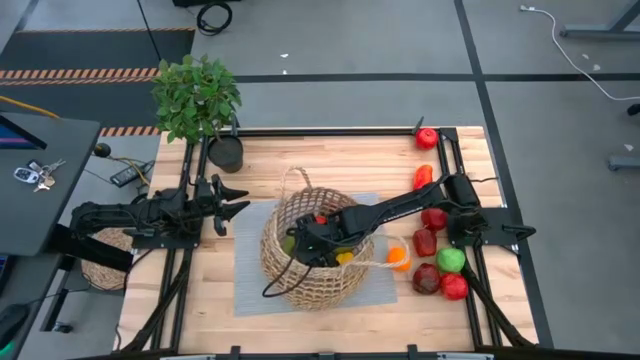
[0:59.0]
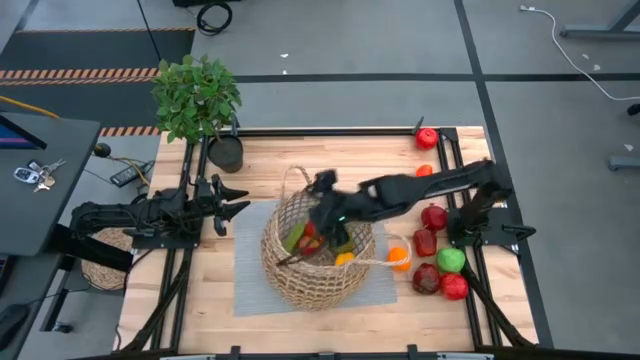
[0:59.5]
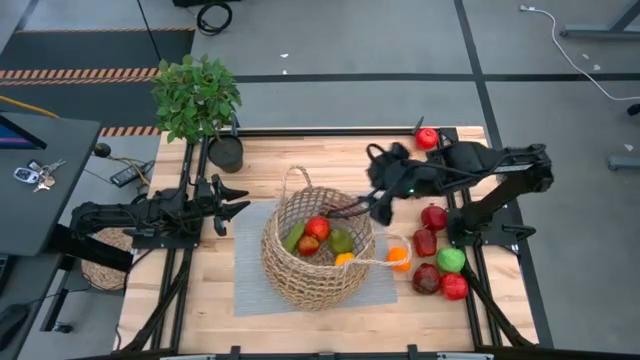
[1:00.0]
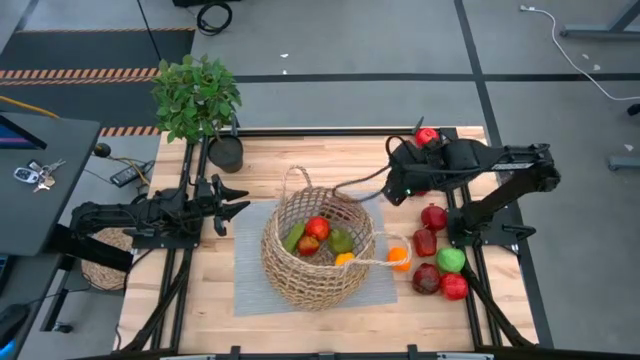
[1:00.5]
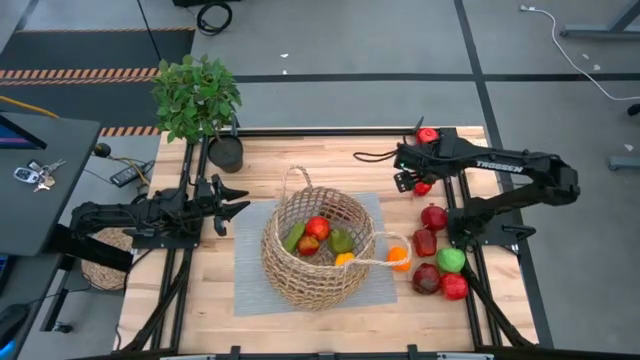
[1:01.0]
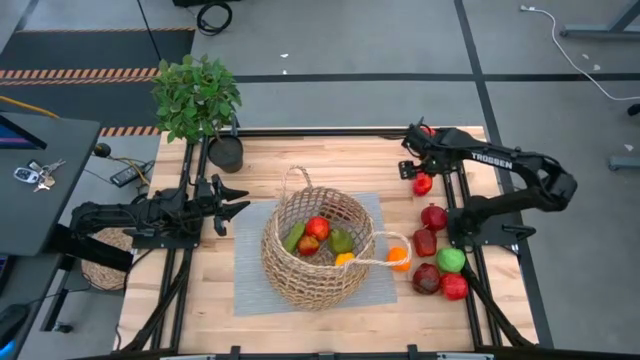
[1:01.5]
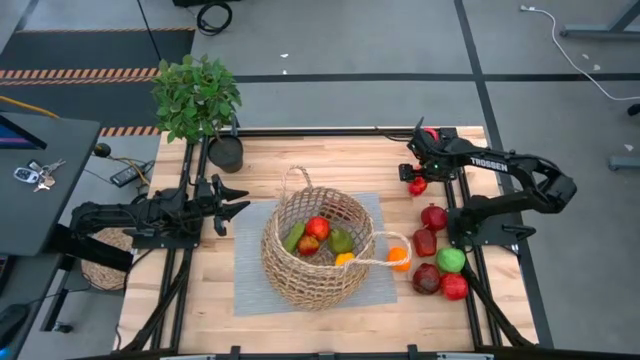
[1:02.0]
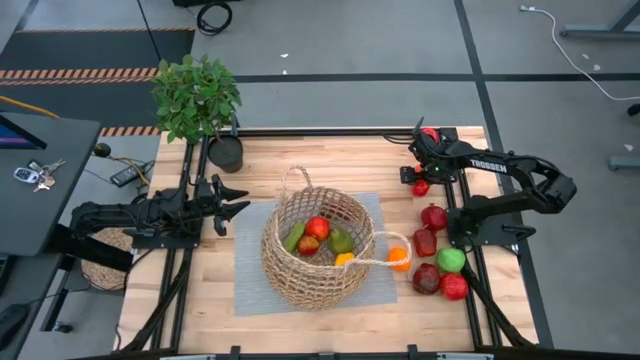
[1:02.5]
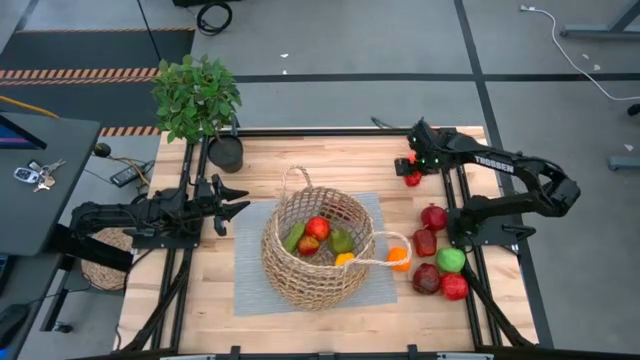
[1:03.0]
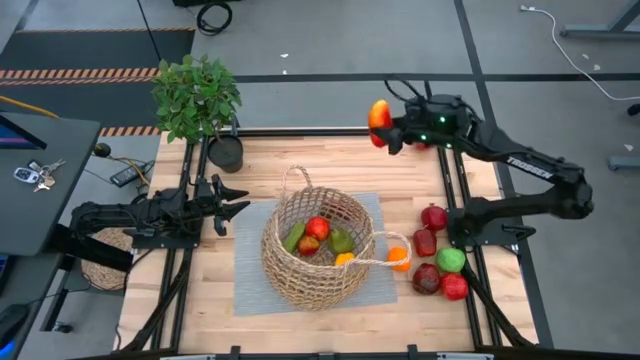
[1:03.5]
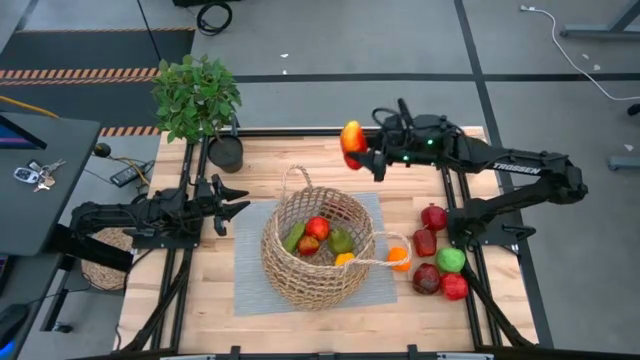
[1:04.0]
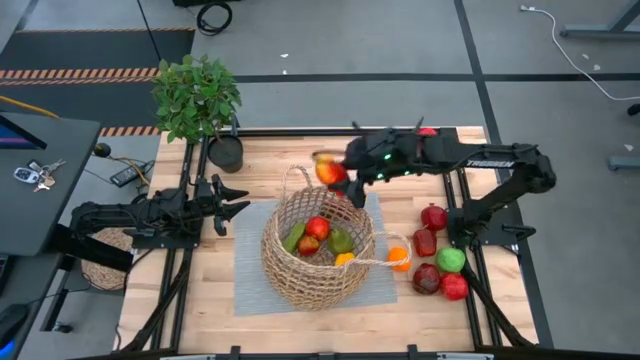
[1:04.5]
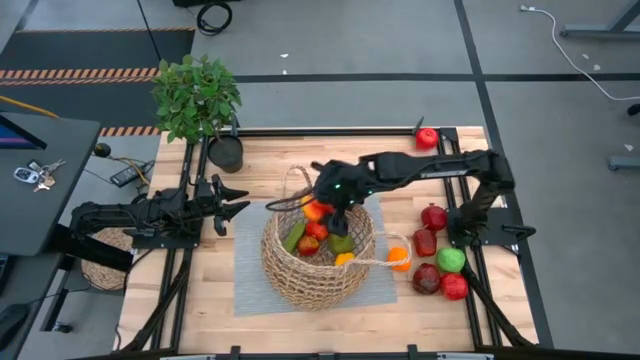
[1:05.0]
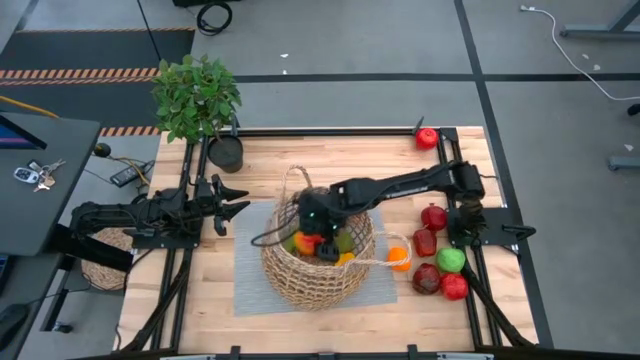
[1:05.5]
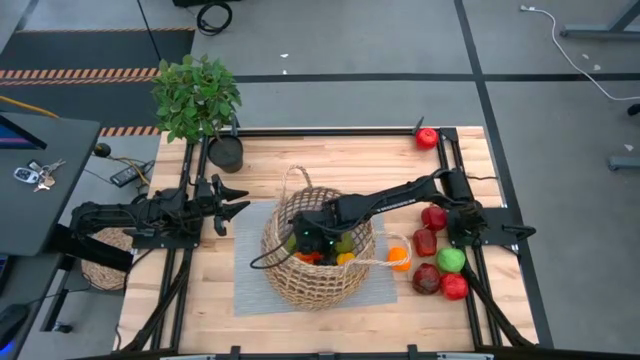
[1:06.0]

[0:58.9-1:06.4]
Task: Build produce basket
Put the orange mango into the basket

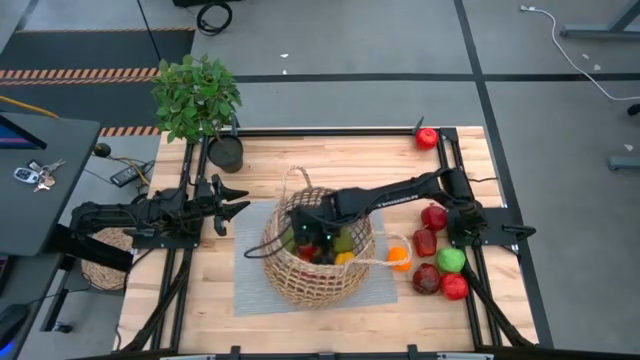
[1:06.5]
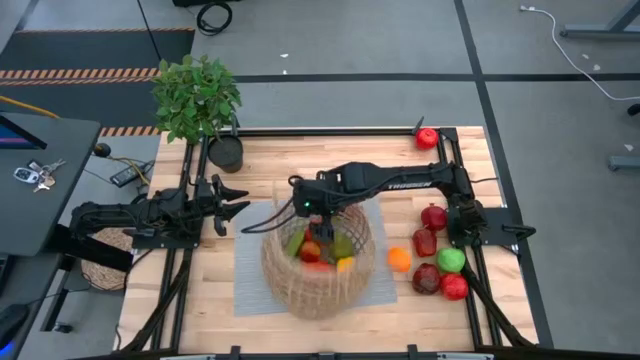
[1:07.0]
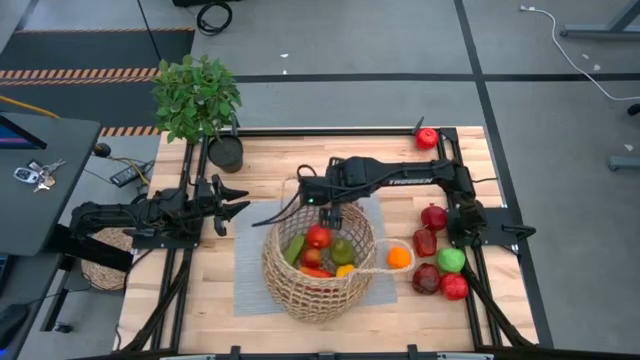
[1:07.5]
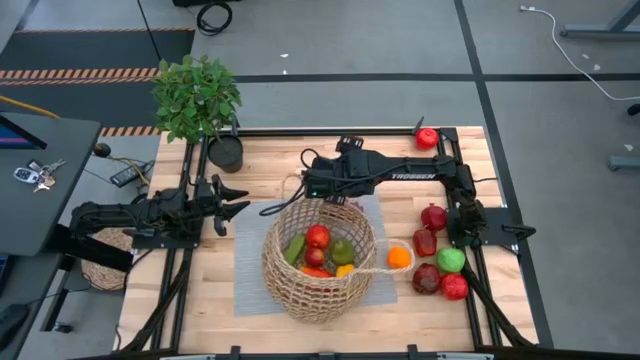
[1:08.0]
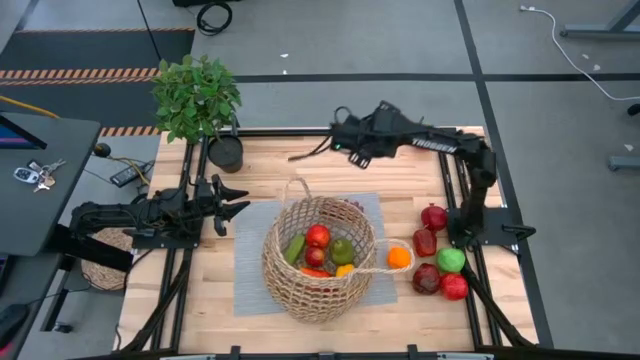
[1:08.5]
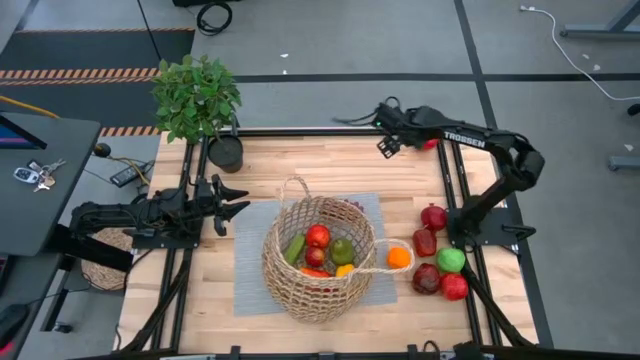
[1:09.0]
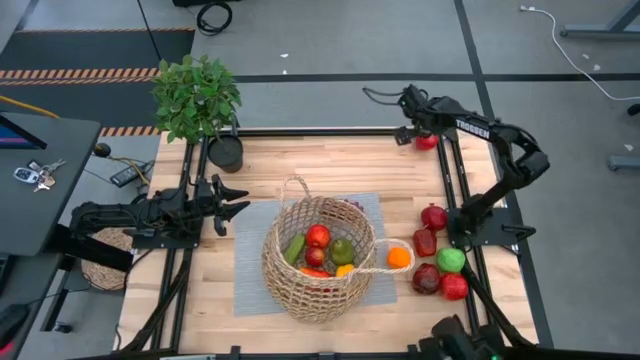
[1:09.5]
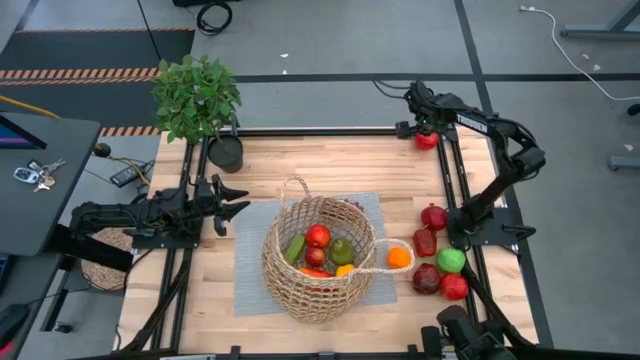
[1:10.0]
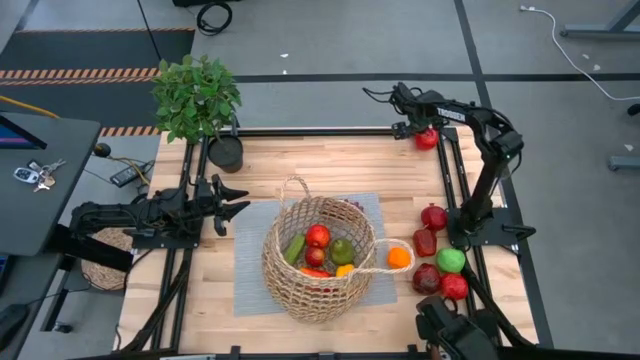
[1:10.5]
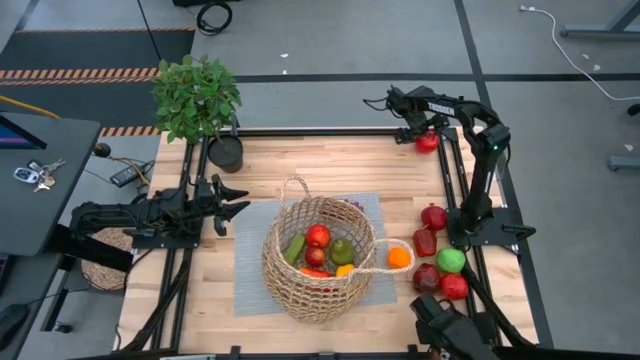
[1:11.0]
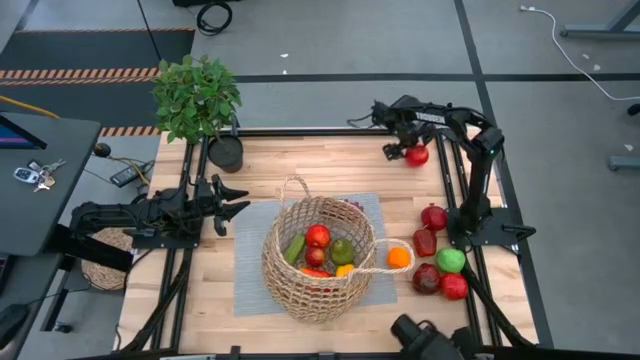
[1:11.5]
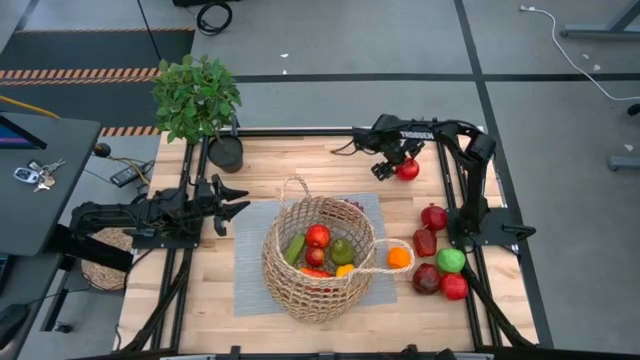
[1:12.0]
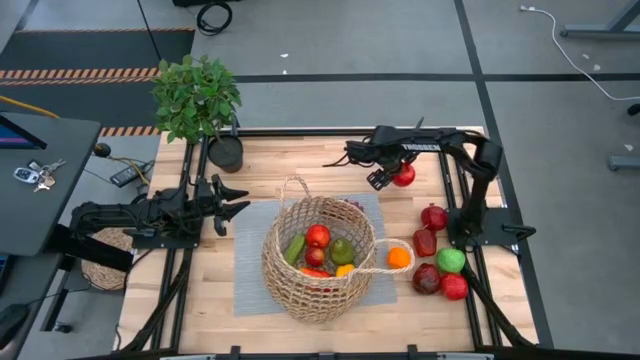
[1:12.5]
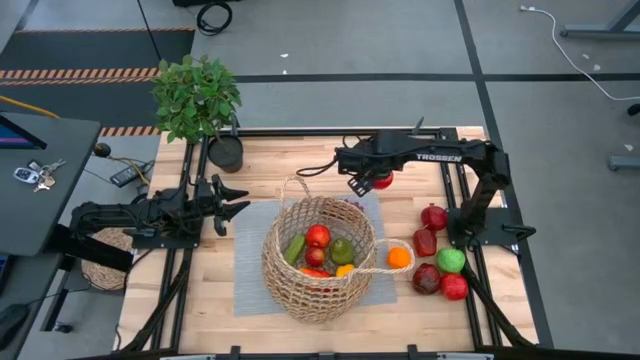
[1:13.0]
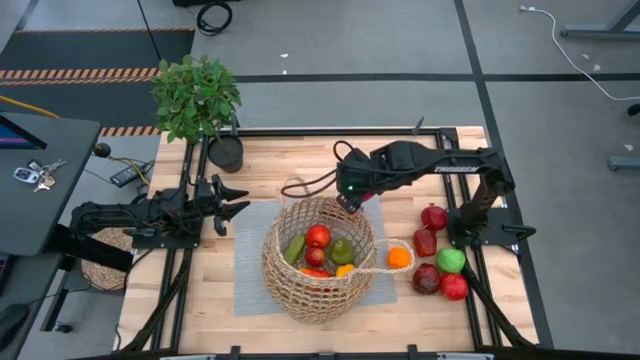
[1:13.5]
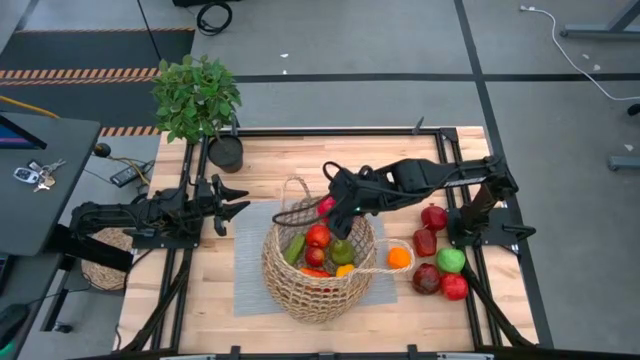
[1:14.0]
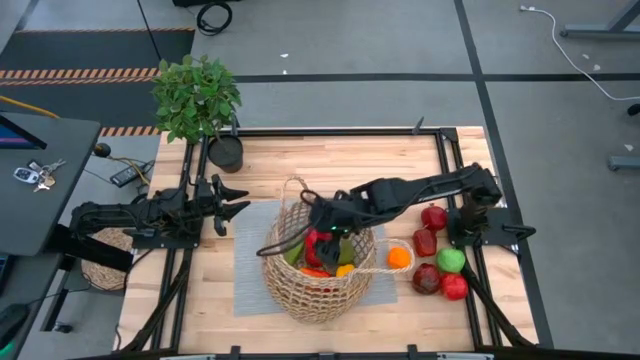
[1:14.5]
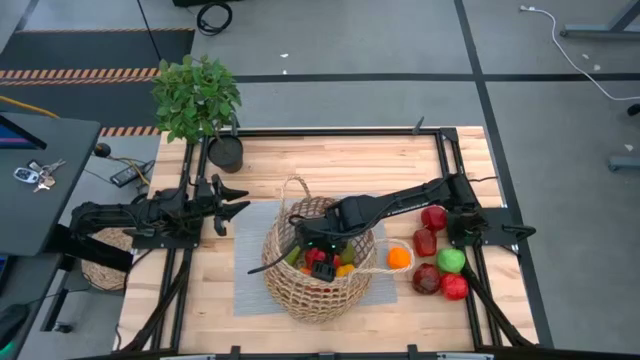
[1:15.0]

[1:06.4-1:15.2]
Put the red apple into the basket

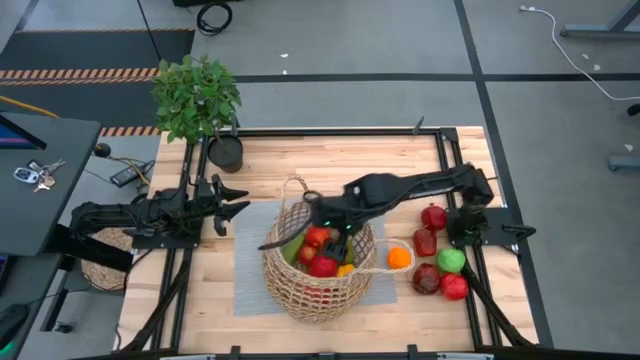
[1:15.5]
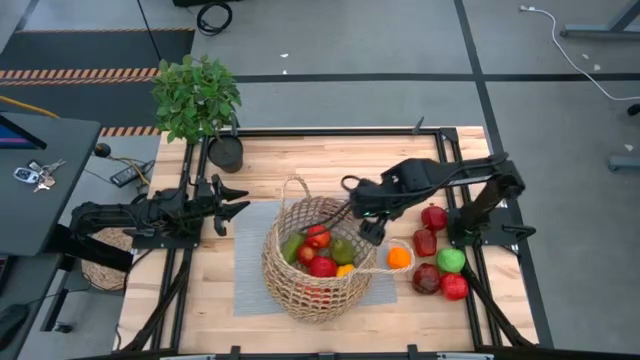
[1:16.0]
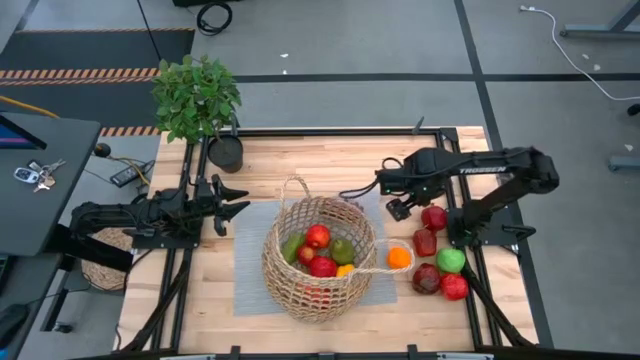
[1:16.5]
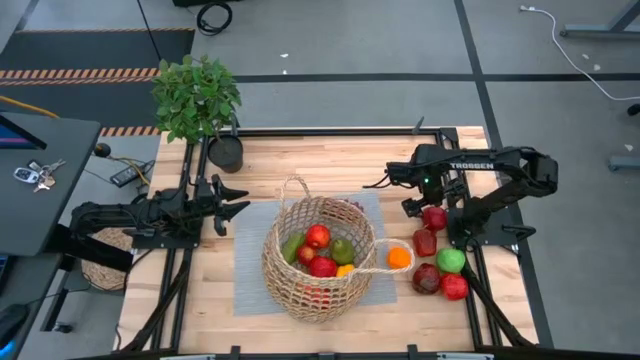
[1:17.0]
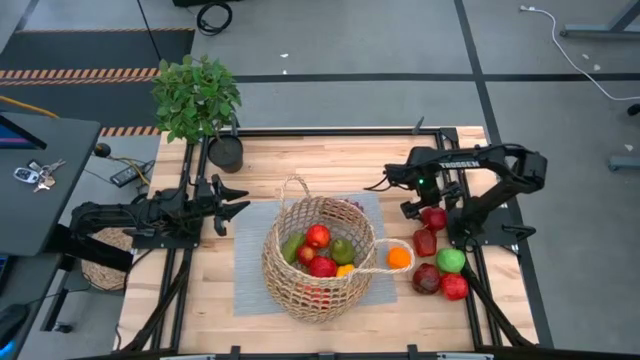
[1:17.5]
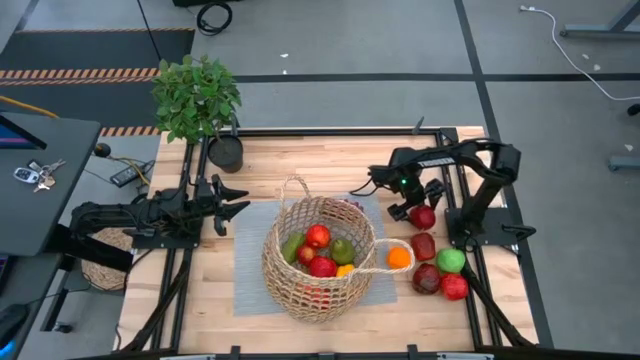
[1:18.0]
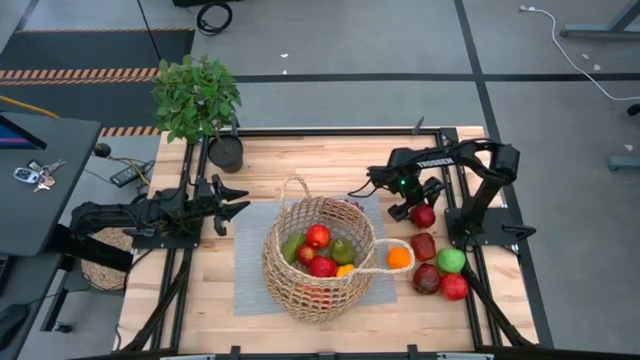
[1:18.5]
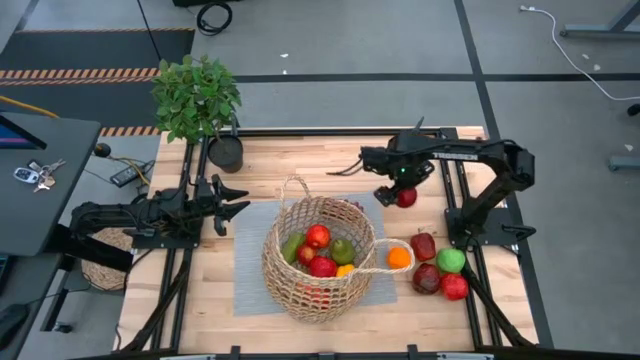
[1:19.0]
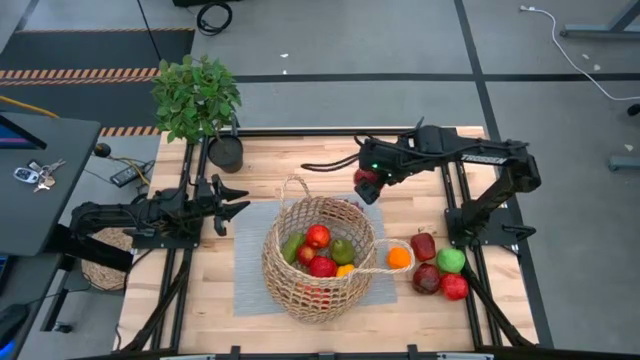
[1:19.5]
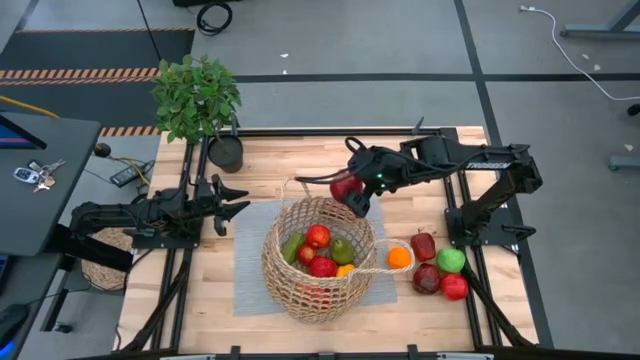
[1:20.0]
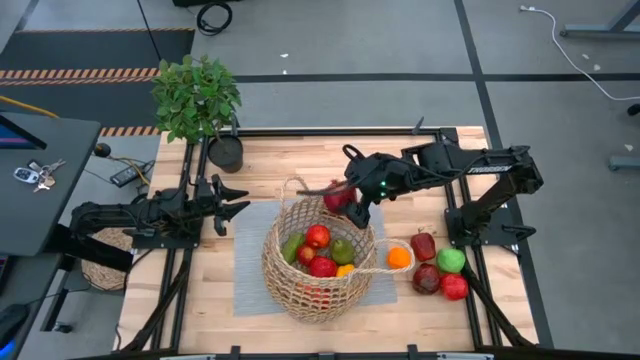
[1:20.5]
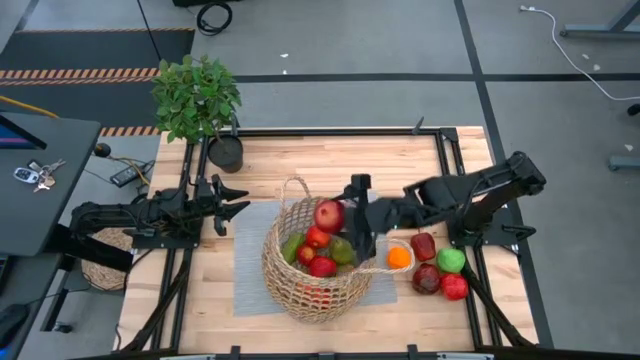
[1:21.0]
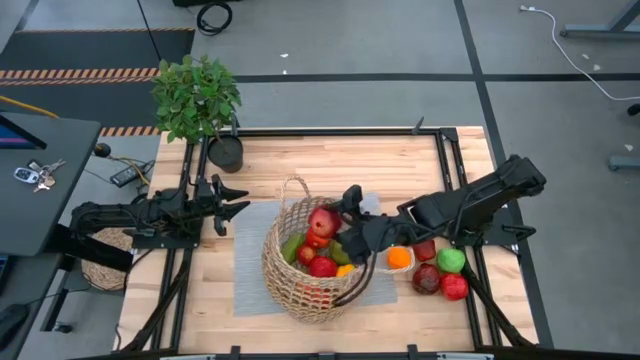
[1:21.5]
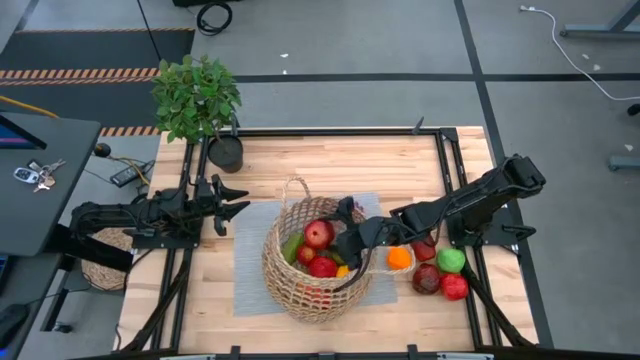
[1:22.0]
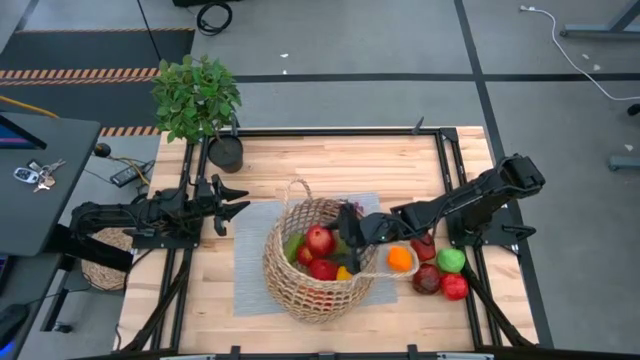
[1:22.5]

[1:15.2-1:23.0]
Put the red pomegranate into the basket
